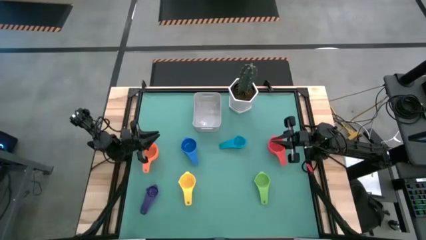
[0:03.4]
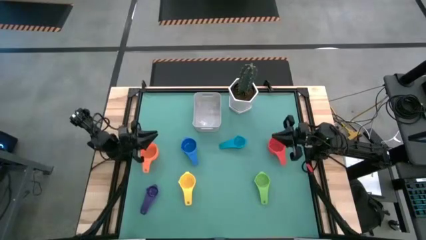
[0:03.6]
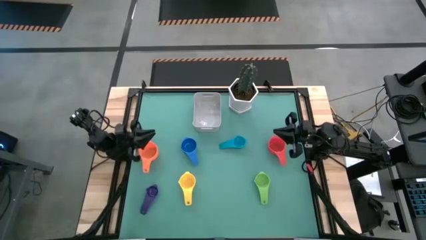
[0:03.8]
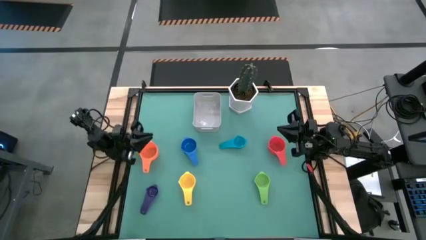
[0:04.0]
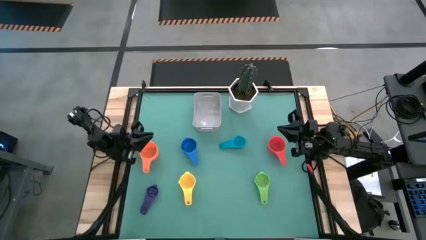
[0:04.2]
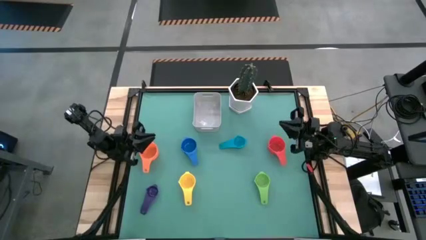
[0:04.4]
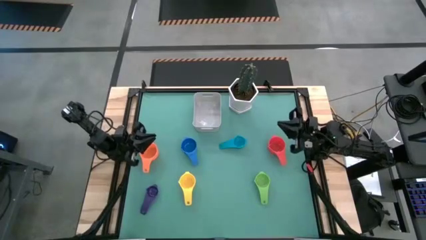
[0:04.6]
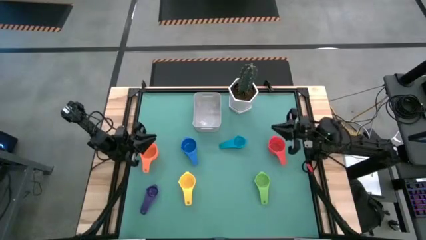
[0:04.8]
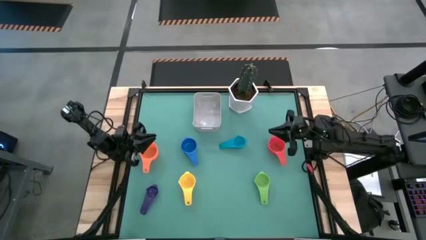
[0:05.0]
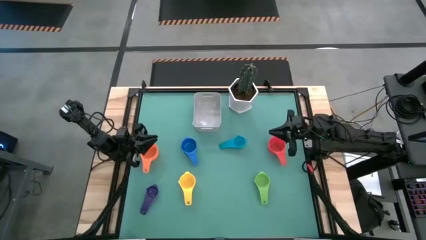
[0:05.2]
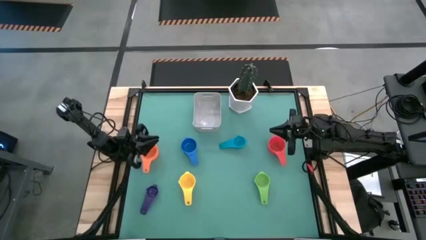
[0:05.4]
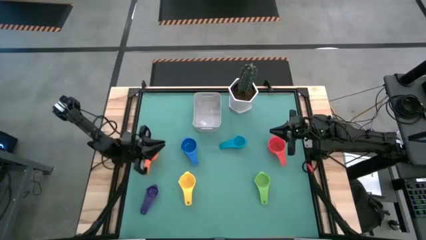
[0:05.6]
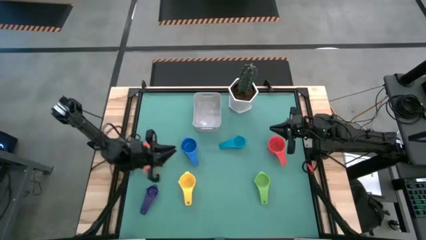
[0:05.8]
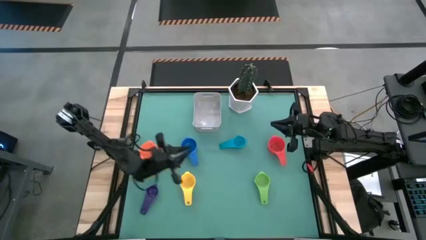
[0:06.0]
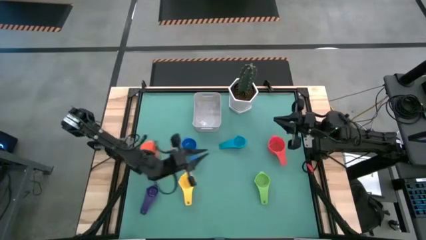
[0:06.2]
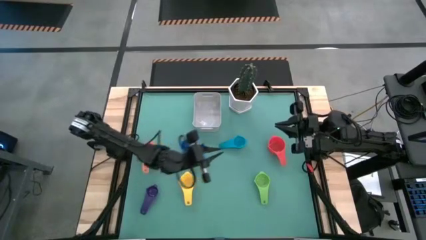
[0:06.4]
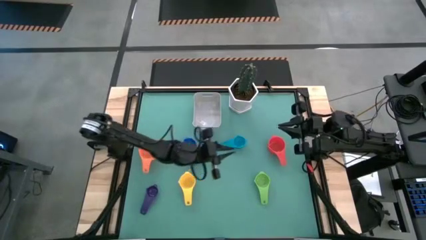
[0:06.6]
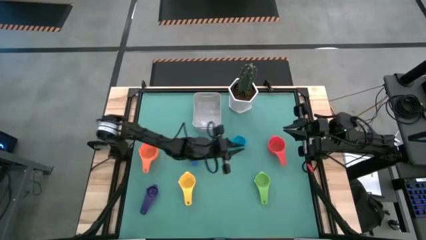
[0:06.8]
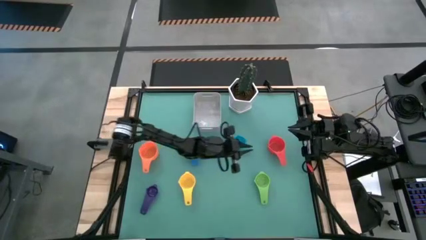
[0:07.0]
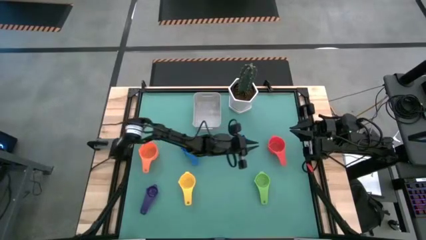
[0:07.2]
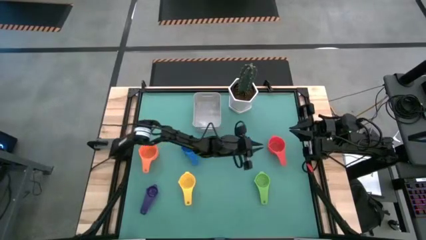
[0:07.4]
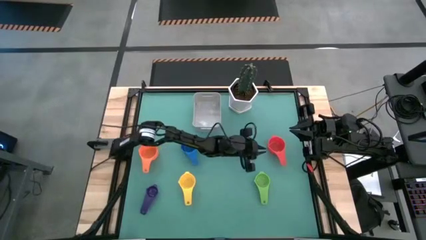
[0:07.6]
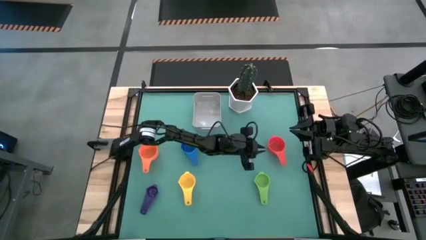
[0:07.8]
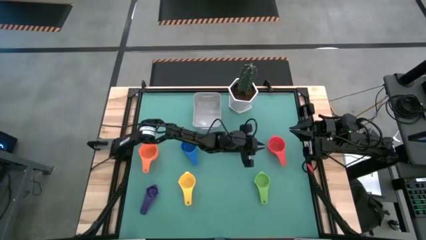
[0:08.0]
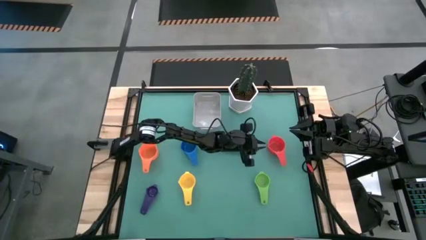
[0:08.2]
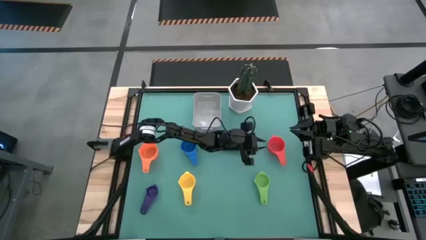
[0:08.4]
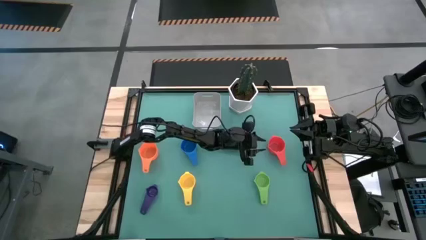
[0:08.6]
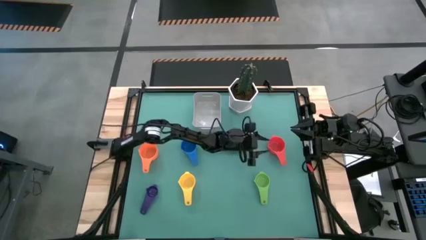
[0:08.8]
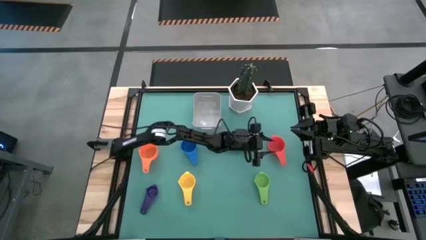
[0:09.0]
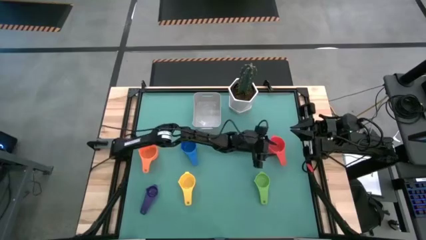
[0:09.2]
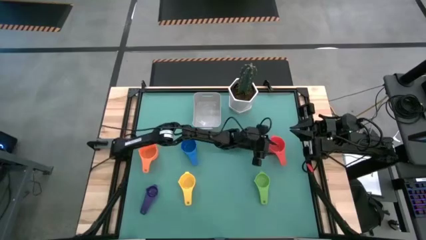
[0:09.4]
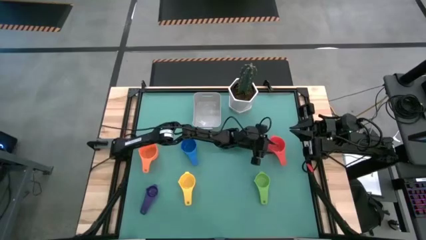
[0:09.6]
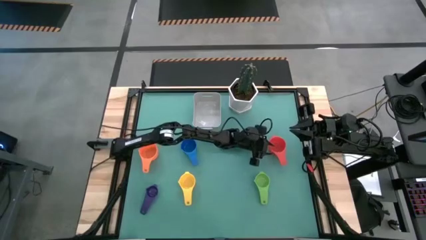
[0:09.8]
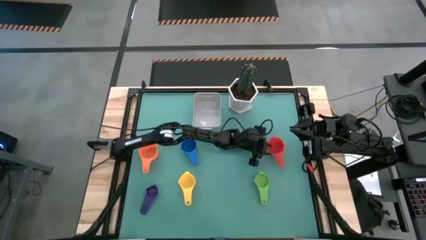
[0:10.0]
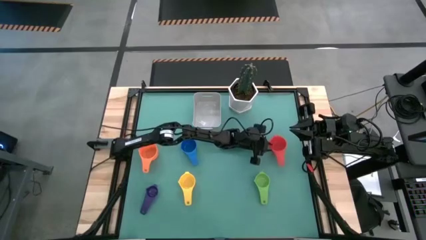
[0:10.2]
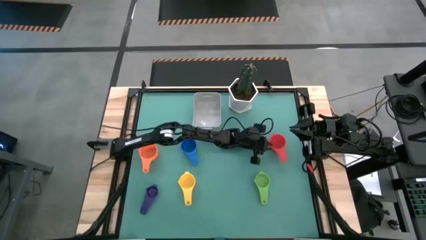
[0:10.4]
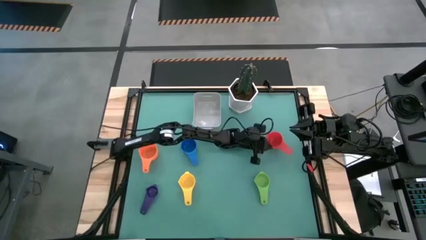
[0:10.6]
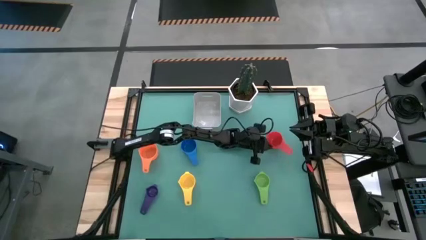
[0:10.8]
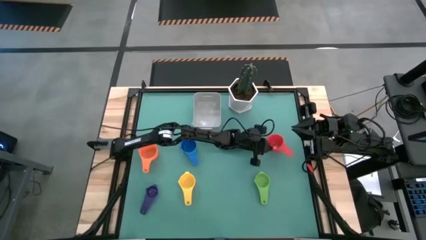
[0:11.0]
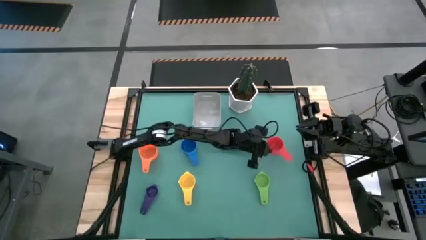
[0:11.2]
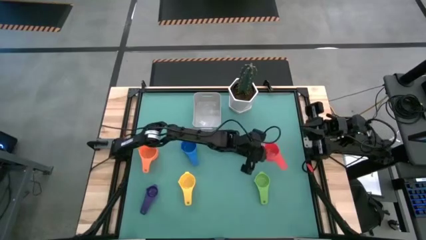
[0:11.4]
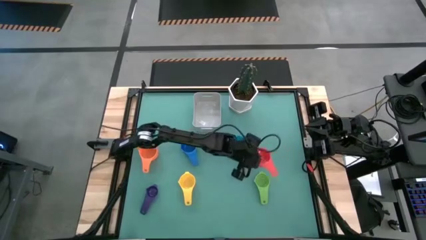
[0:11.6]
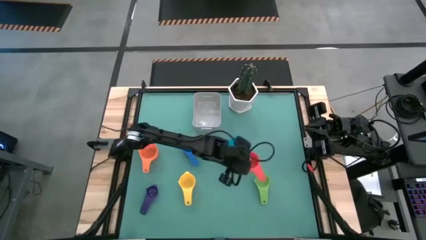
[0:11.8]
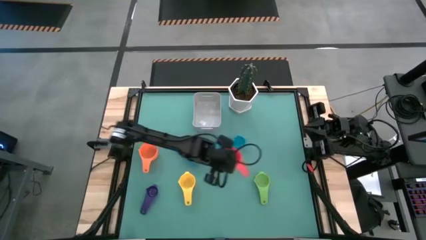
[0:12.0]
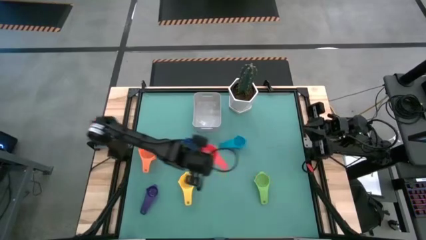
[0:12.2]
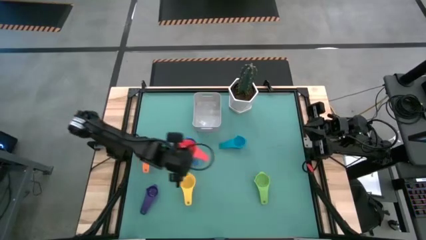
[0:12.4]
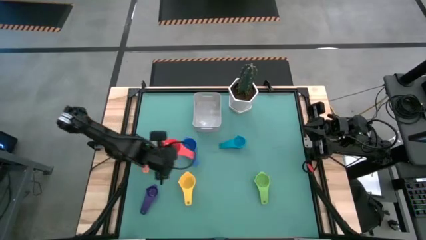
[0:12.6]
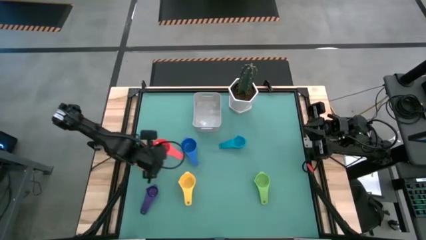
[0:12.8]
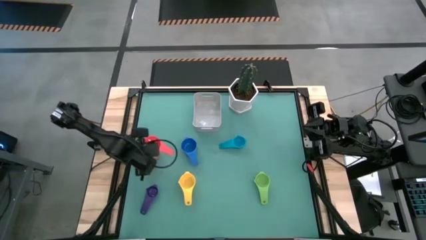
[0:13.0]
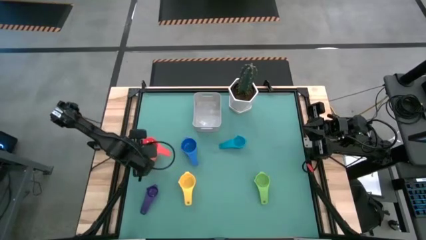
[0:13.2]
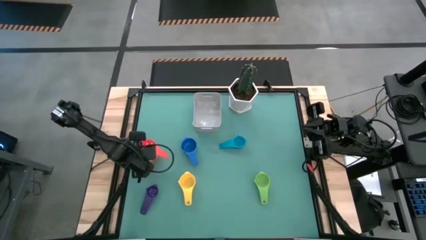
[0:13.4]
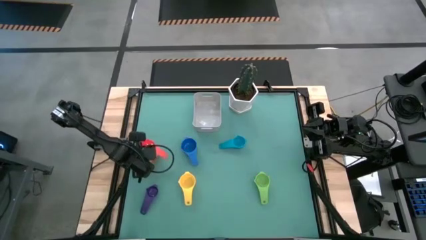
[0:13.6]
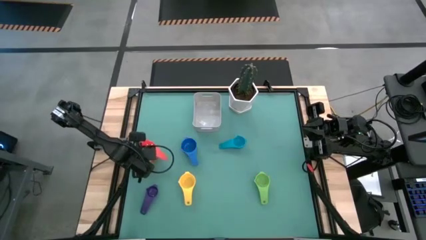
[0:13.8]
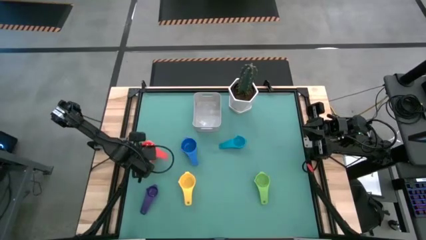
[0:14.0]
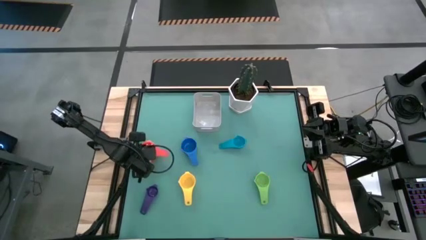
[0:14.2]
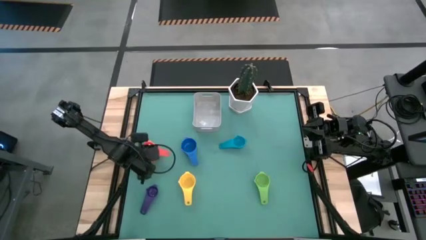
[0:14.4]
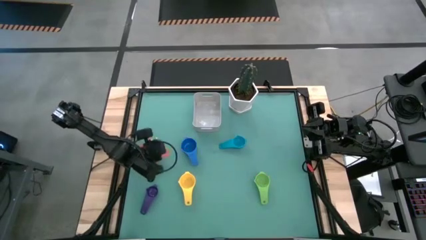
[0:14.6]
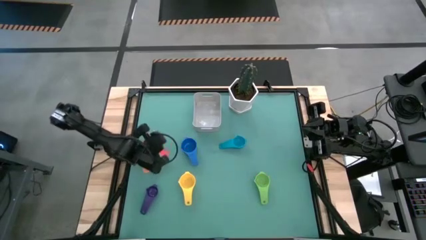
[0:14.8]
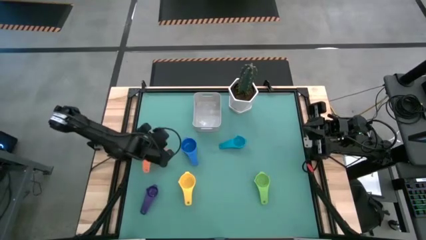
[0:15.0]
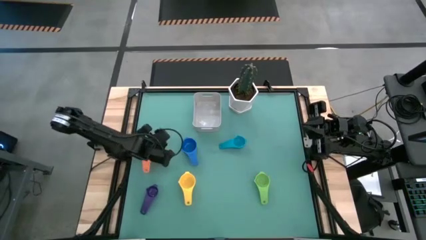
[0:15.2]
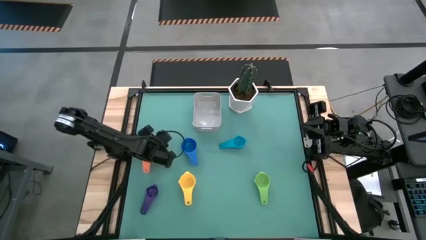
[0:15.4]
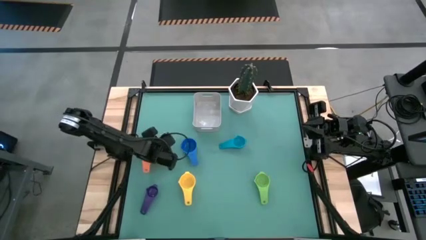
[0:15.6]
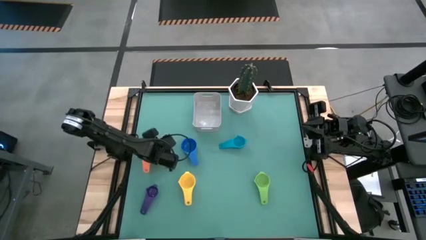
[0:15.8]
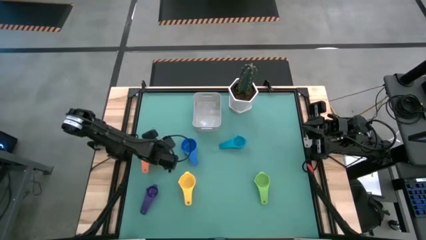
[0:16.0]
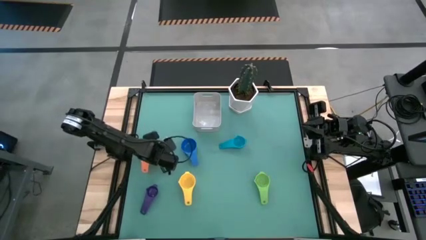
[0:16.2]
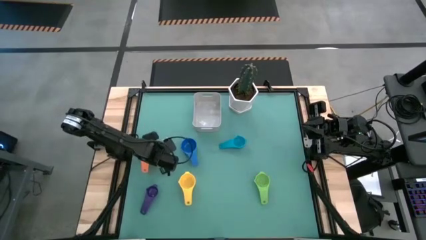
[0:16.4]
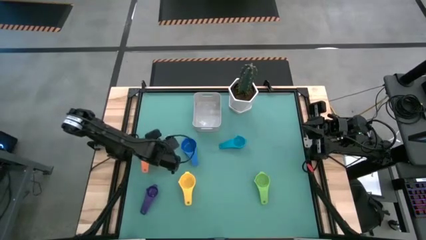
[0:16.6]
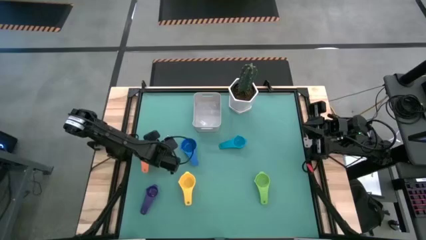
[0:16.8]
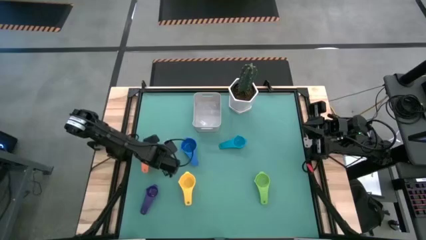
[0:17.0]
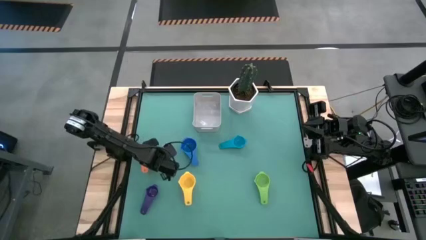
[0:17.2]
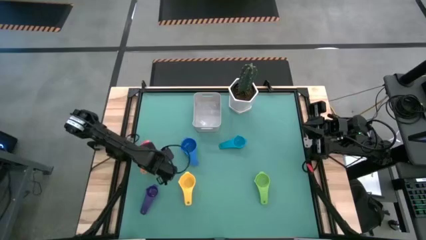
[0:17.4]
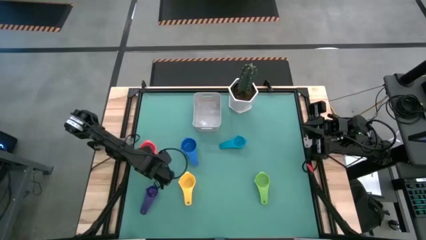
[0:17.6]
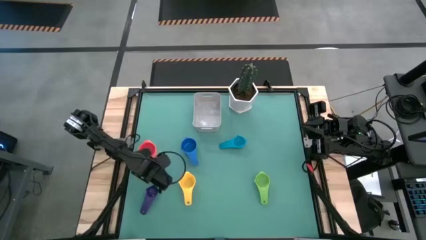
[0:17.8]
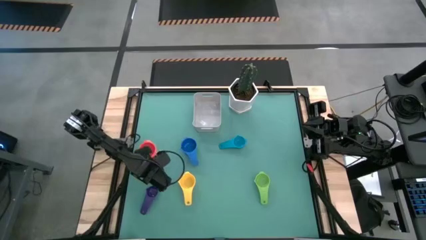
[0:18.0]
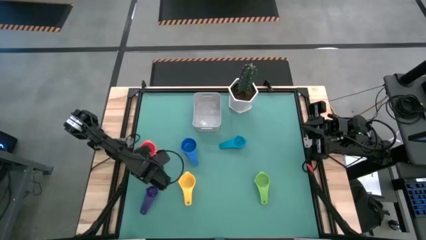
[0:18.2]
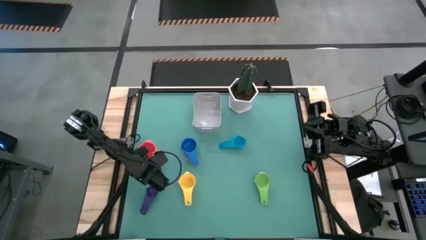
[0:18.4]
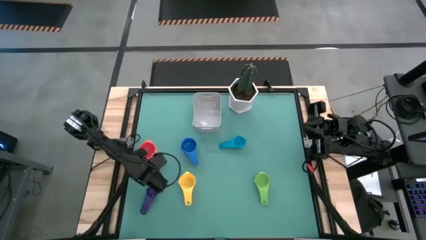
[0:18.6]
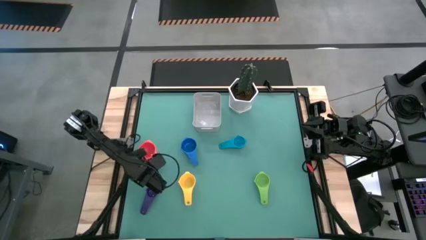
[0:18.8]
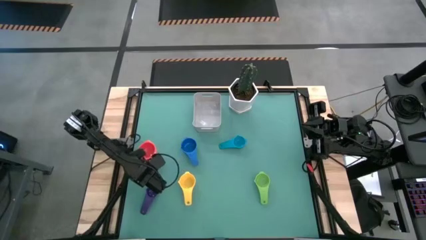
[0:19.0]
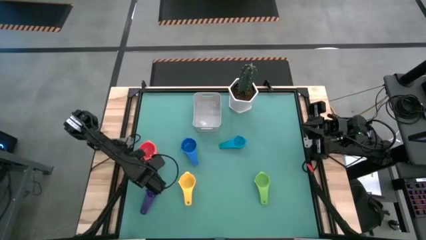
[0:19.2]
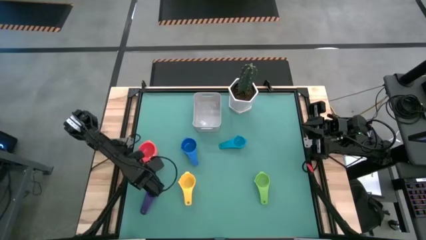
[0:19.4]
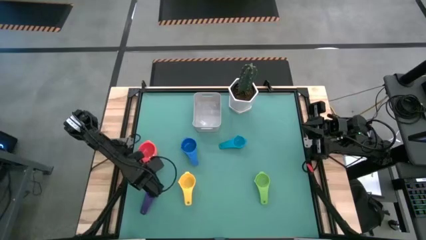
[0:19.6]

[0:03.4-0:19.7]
Task: Nest measuring cups in basket
Stack the red measuring cup on top of the orange measuring cup
